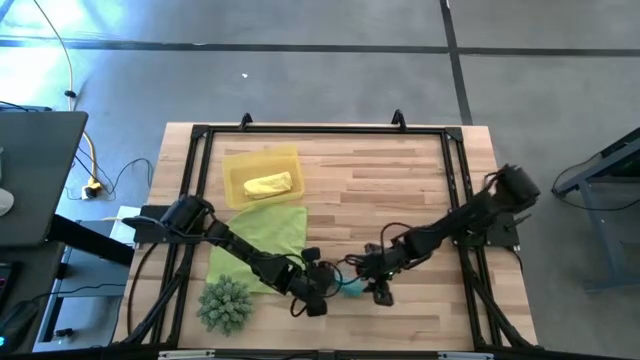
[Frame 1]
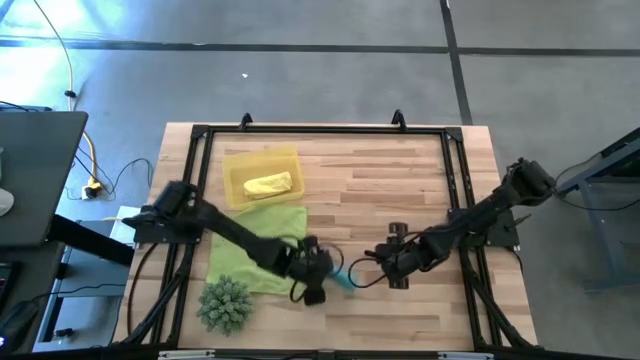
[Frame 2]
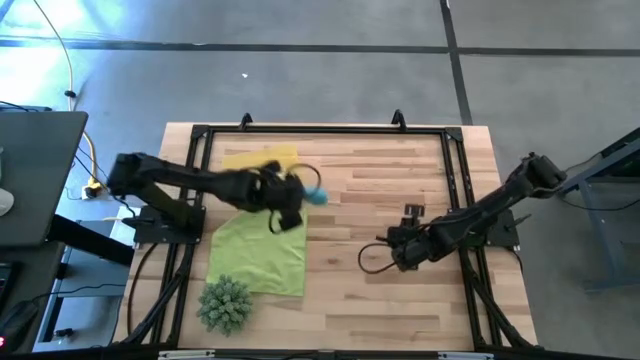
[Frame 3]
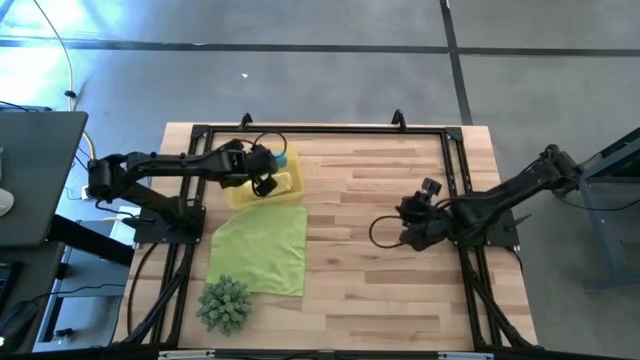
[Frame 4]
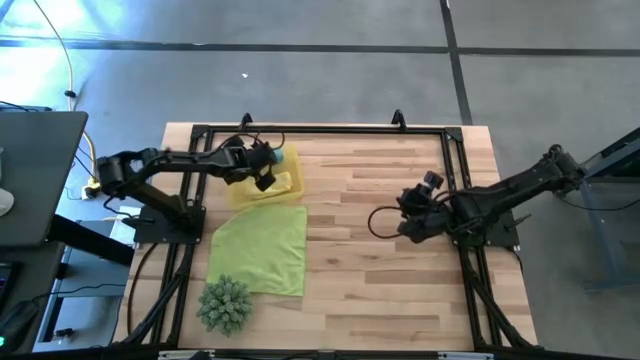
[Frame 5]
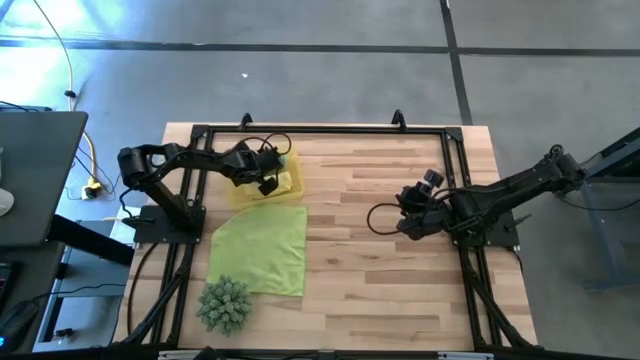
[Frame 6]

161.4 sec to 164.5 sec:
Task: Roll microfiber towels into tight, uniform cylinder then place into a basket
Put the blue microfiber towel into the yellow bin

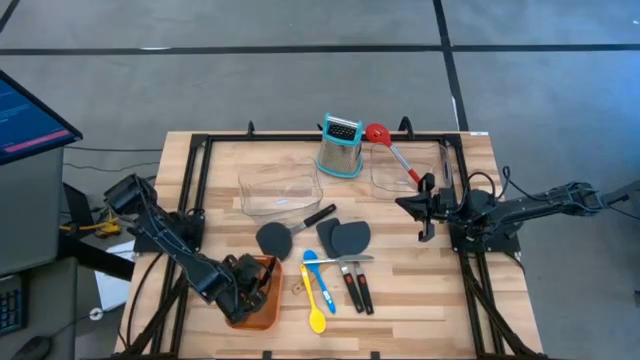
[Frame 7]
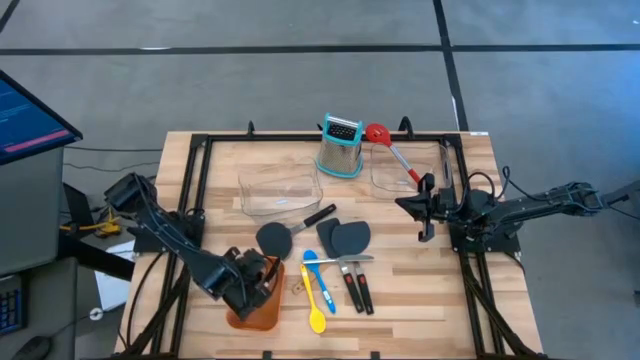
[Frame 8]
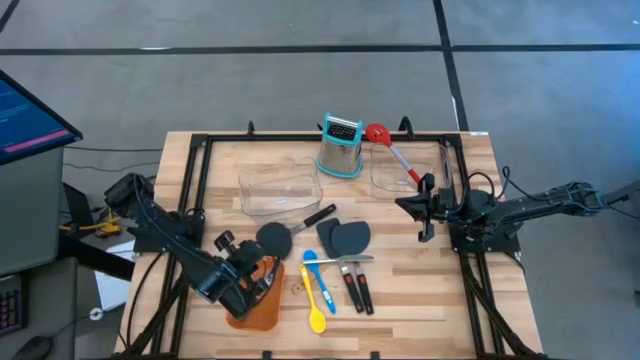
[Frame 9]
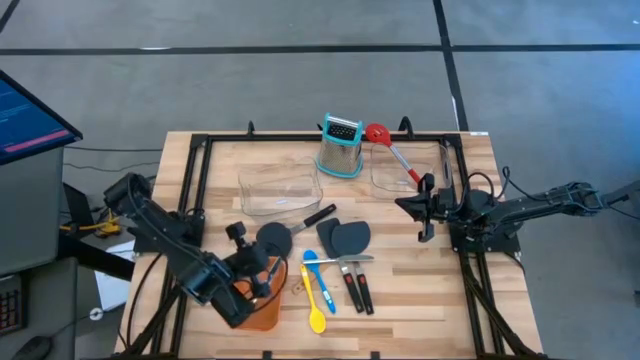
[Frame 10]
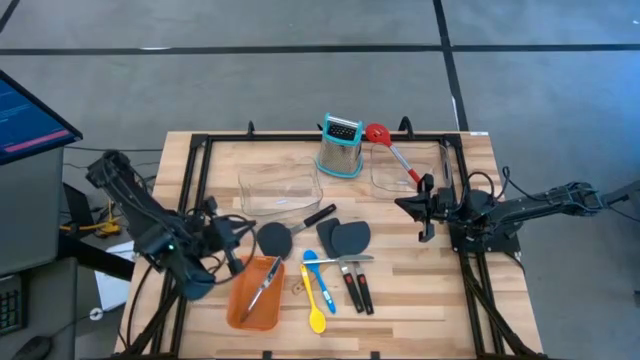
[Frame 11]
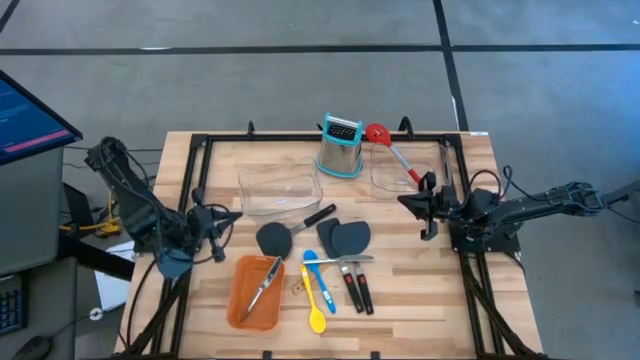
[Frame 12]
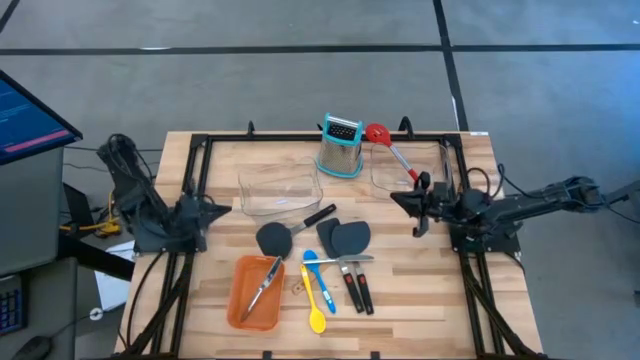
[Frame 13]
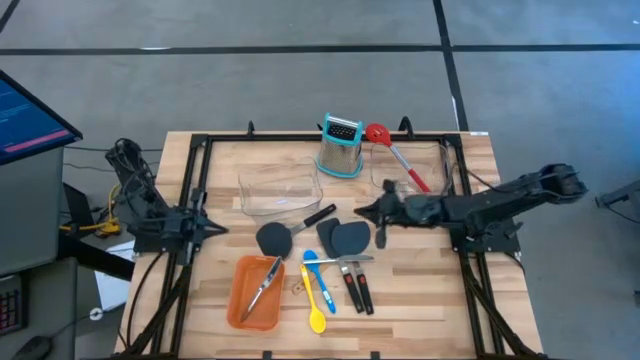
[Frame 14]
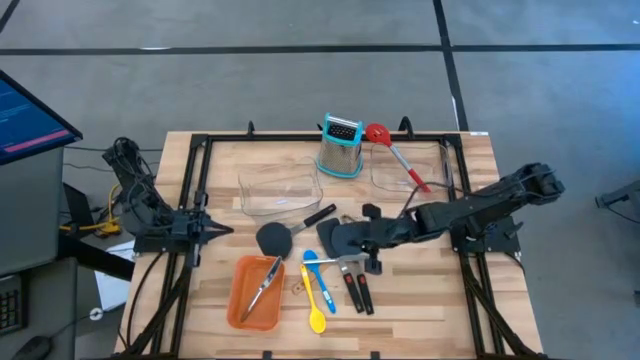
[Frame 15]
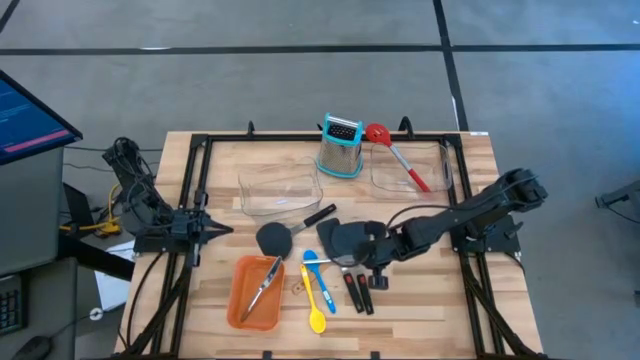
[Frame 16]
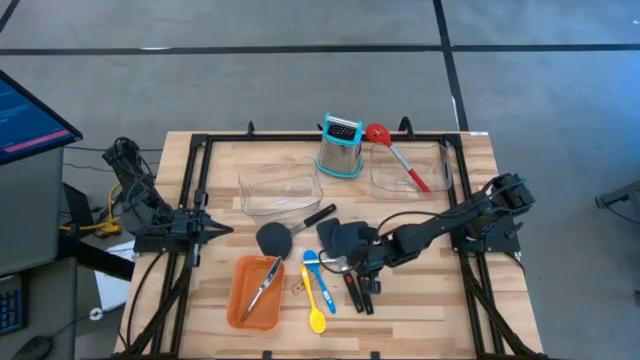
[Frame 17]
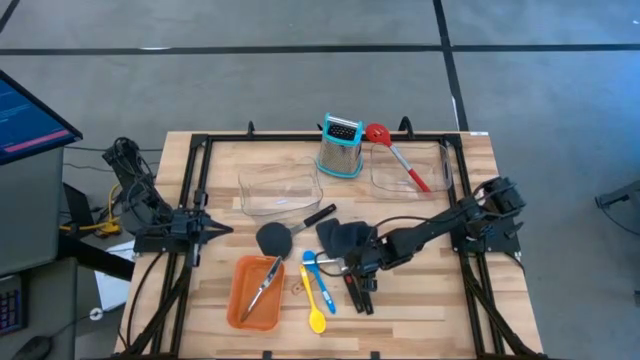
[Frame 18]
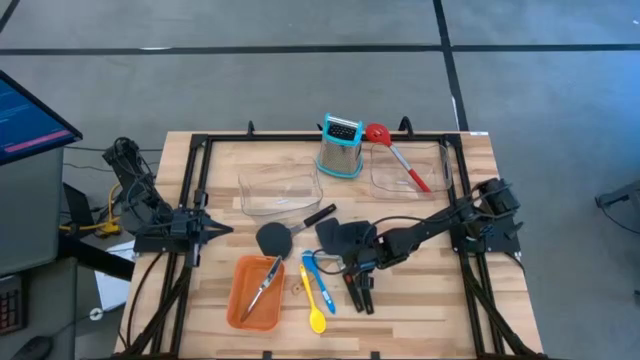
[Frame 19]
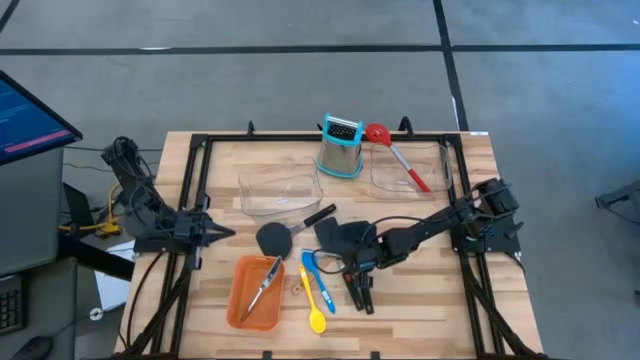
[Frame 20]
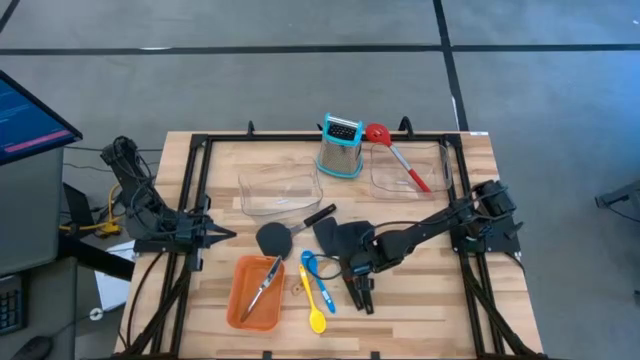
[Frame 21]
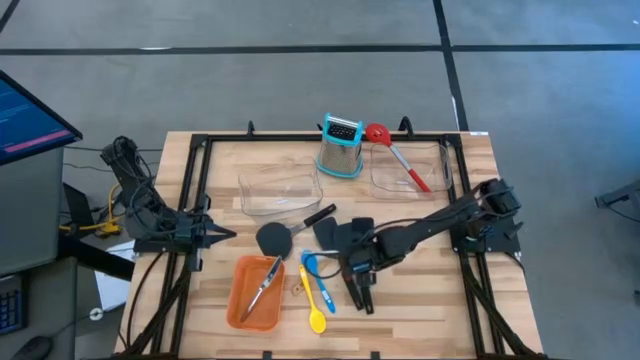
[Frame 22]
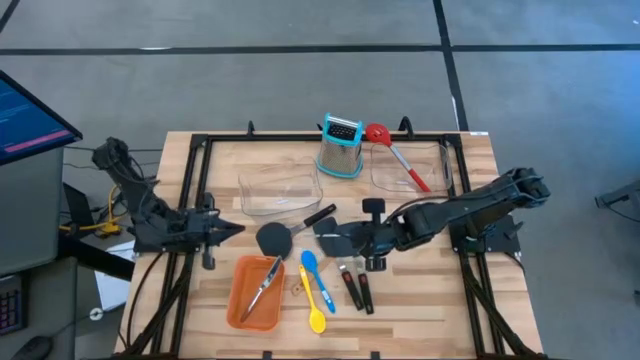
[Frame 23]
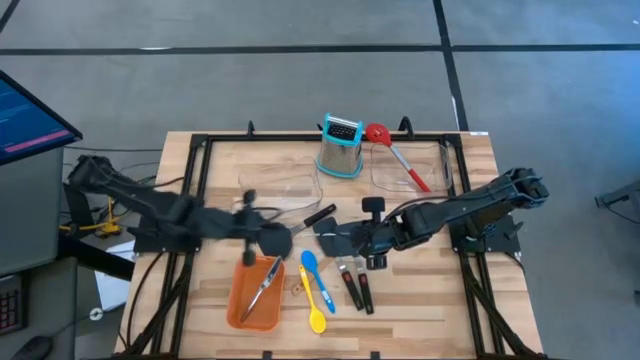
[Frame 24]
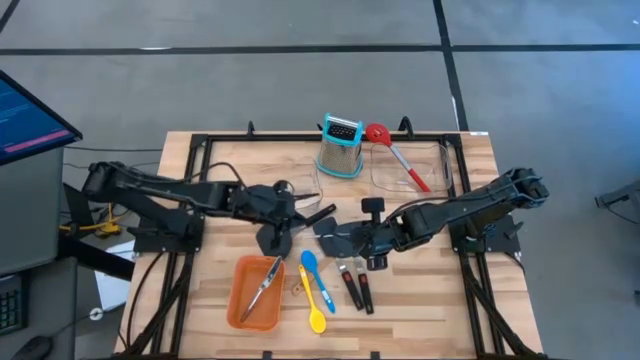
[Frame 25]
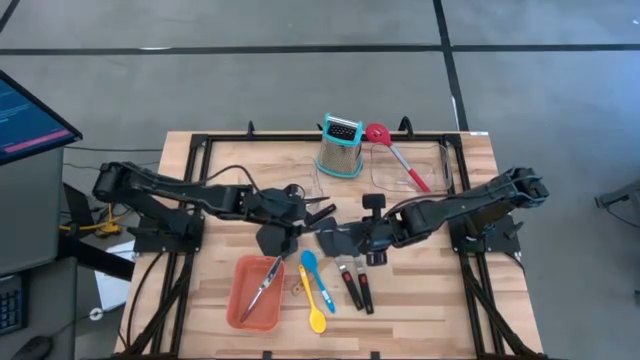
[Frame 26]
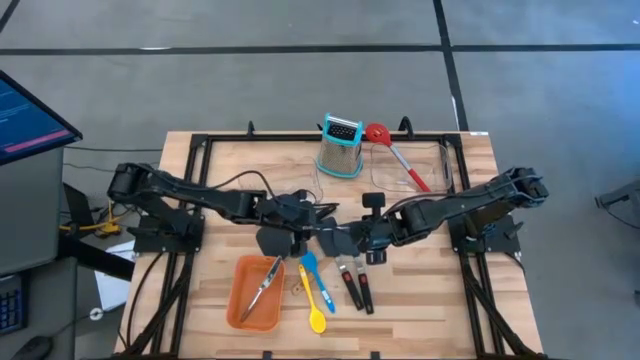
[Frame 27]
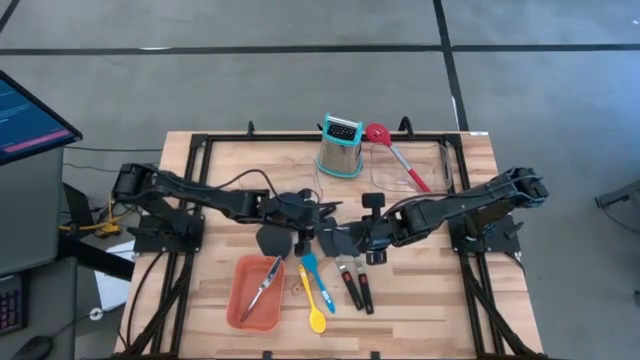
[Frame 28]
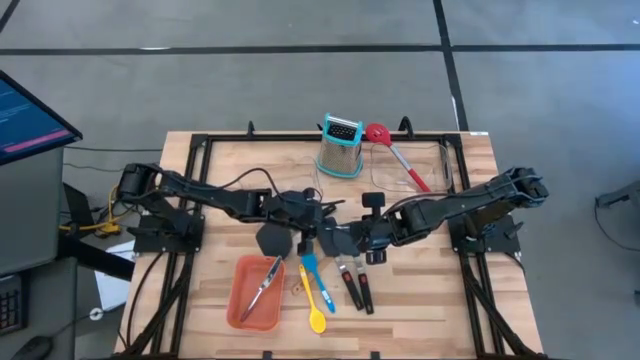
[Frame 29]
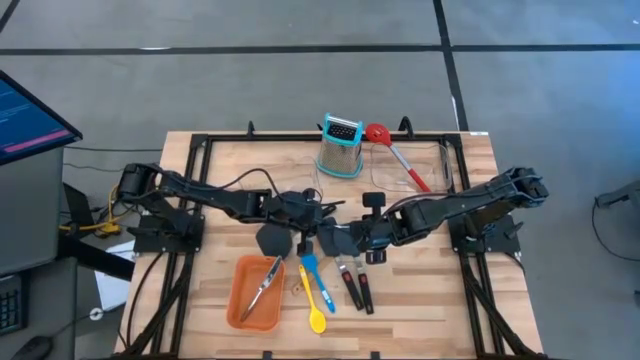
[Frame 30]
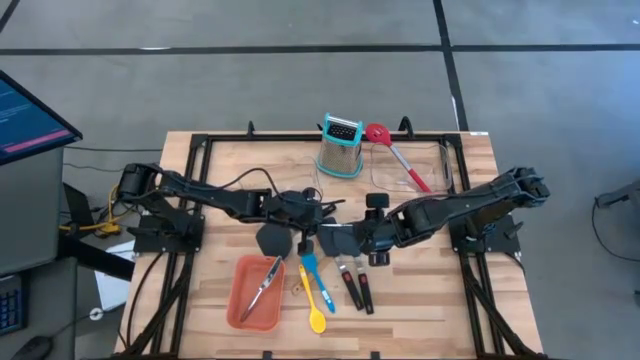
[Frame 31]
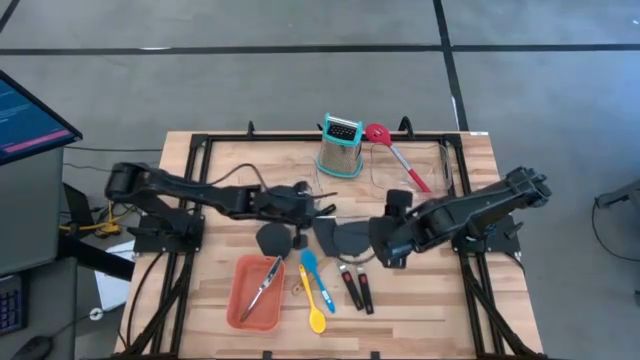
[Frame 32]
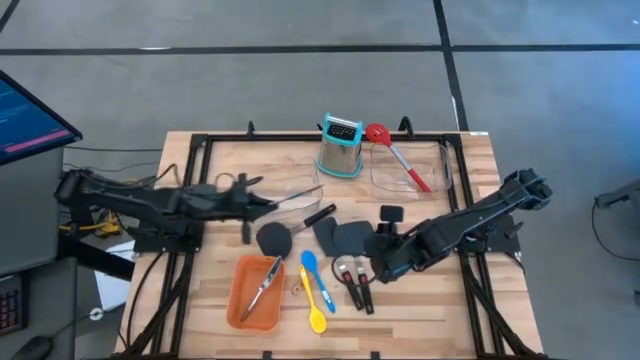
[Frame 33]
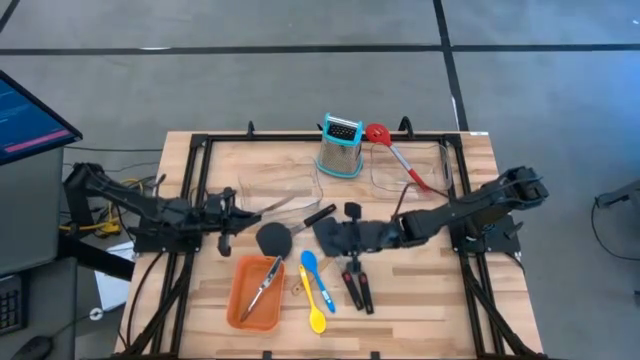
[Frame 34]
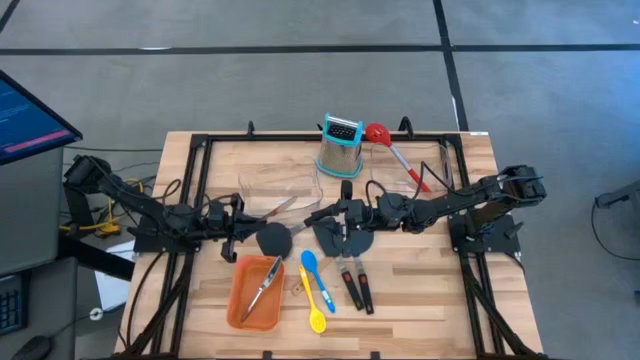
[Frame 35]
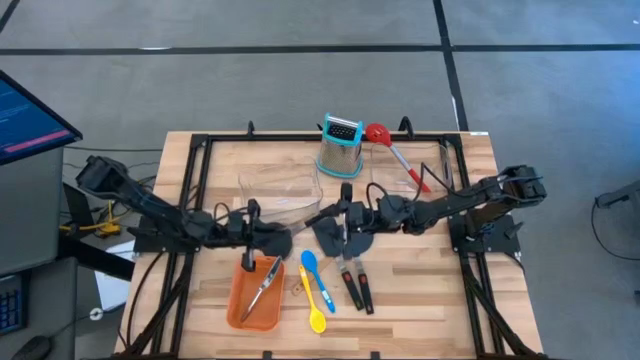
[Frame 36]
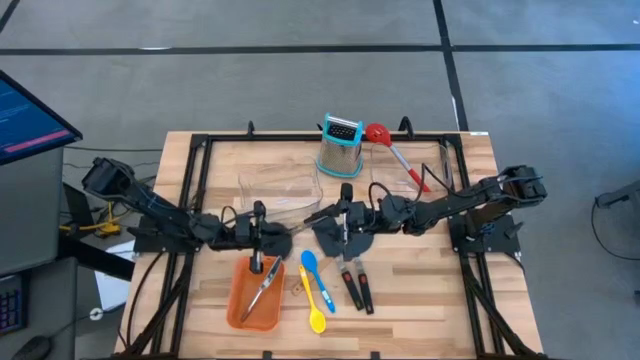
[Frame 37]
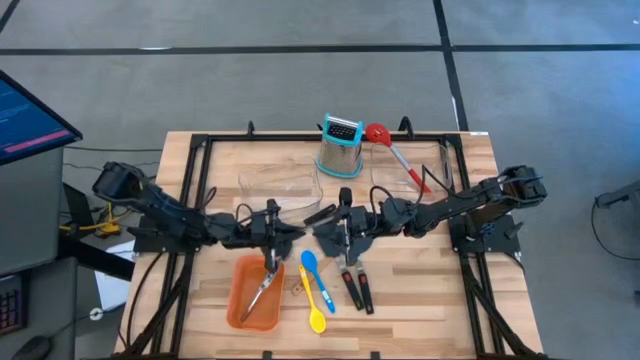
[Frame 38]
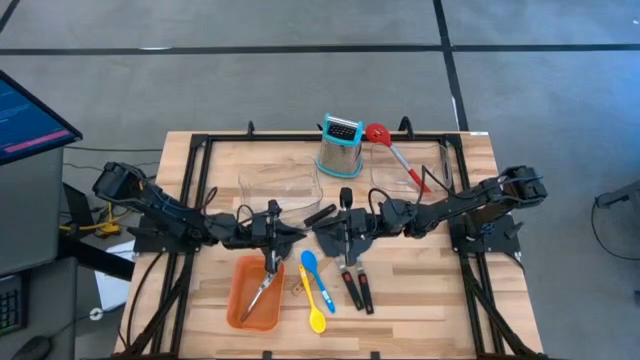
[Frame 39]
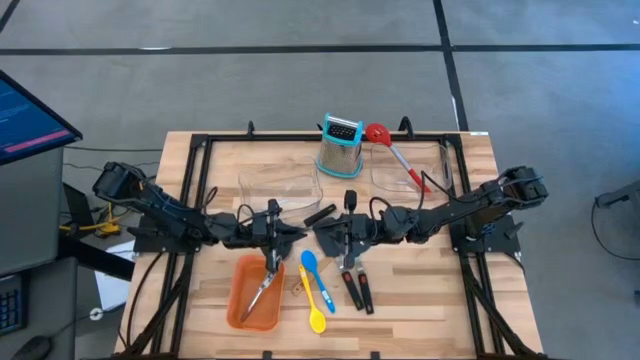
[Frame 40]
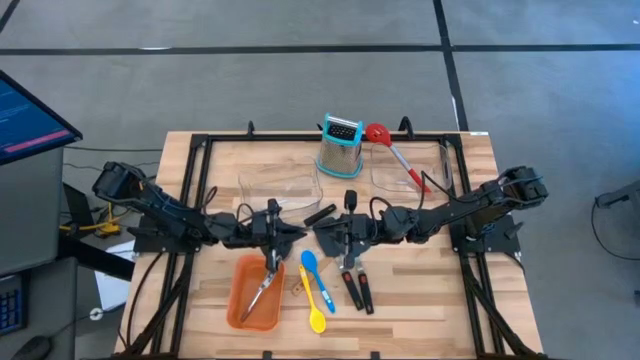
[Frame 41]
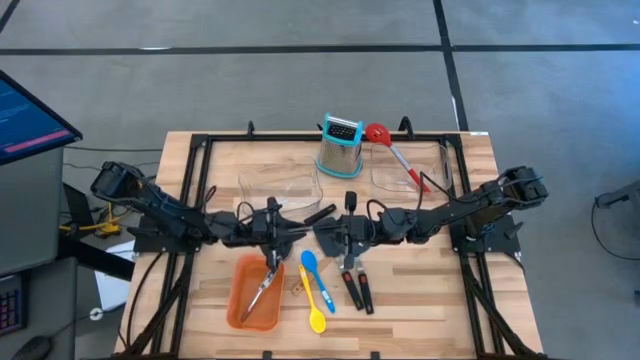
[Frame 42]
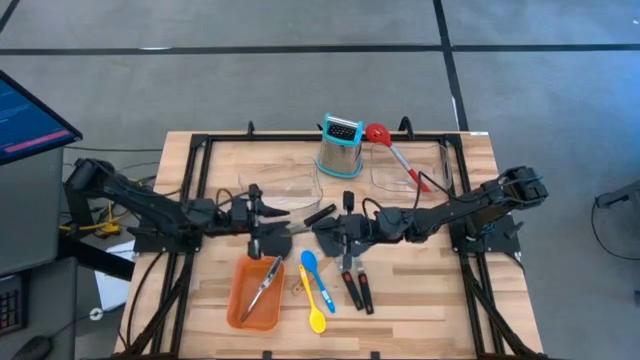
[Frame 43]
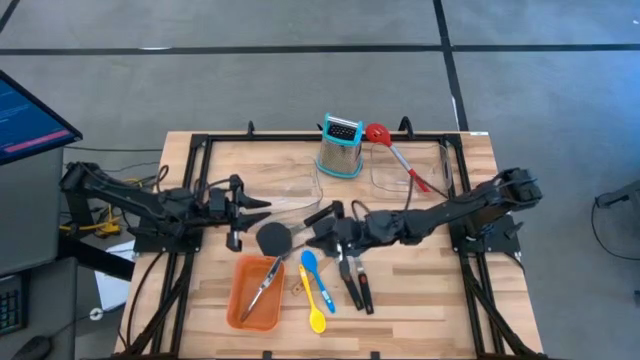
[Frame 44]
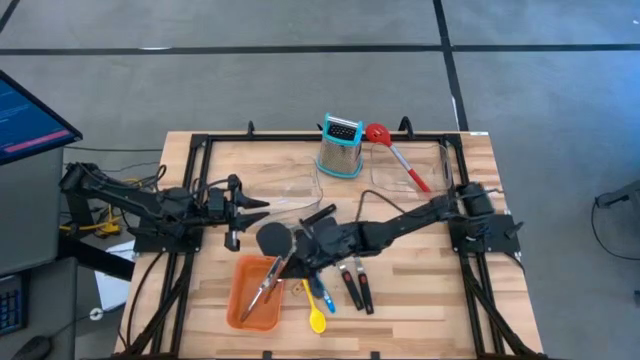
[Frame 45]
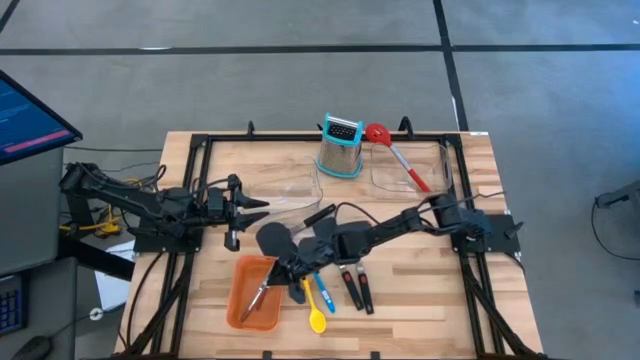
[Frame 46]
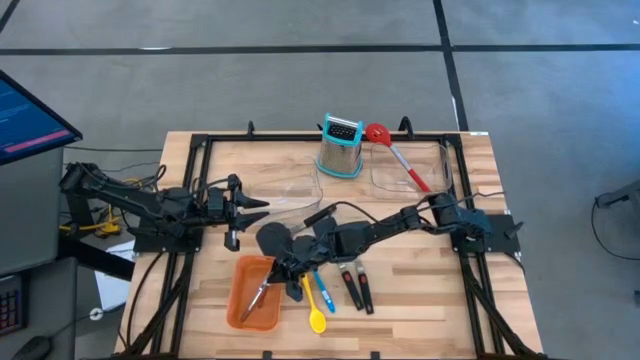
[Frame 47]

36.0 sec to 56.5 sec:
Task: Pick & Place Kitchen Items
Put the silver table knife into the orange bin
